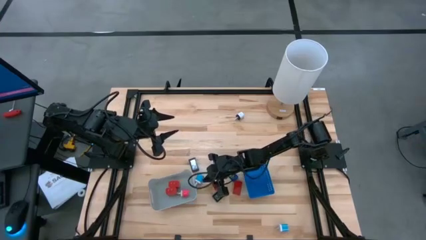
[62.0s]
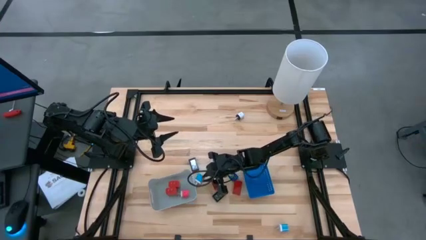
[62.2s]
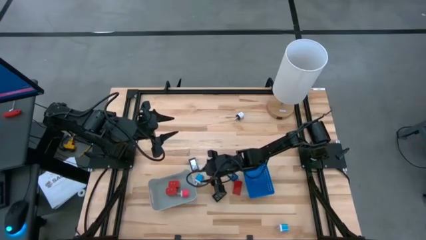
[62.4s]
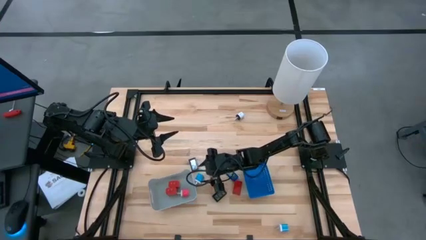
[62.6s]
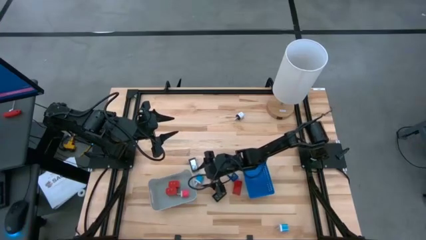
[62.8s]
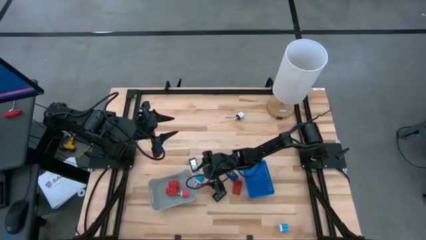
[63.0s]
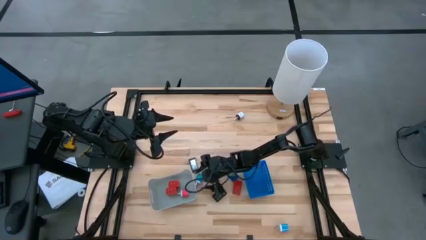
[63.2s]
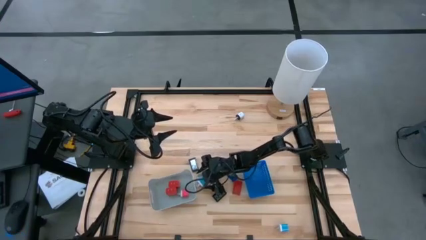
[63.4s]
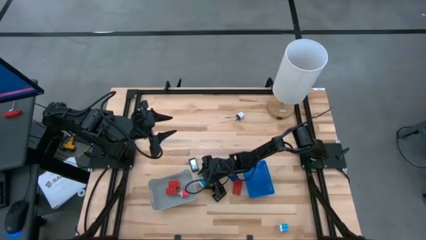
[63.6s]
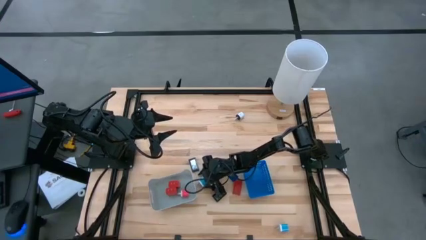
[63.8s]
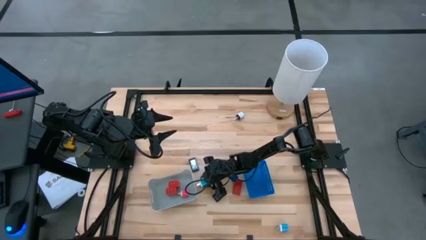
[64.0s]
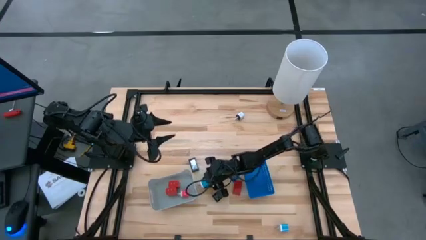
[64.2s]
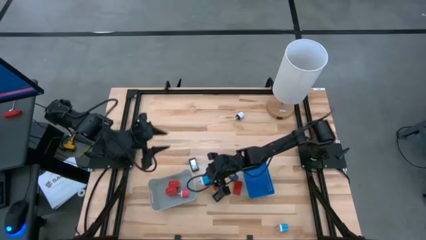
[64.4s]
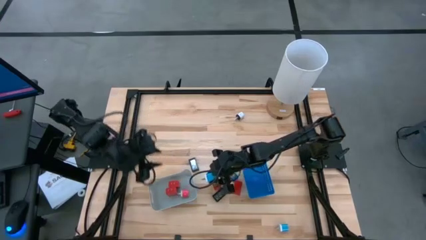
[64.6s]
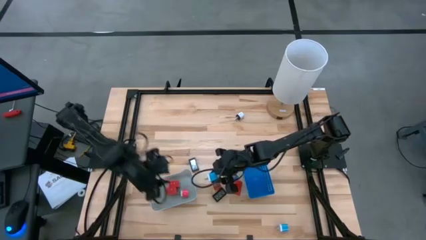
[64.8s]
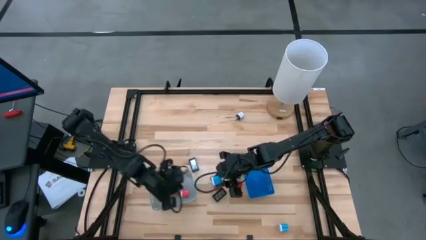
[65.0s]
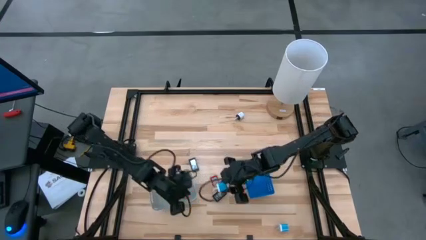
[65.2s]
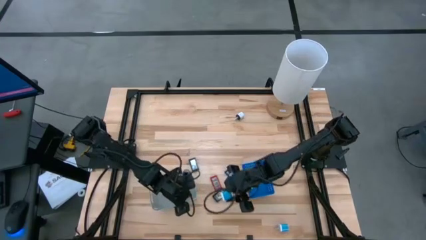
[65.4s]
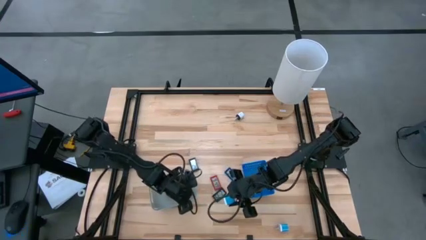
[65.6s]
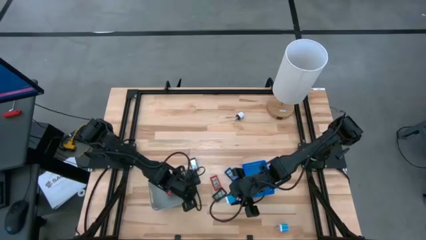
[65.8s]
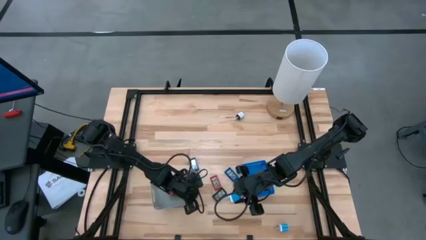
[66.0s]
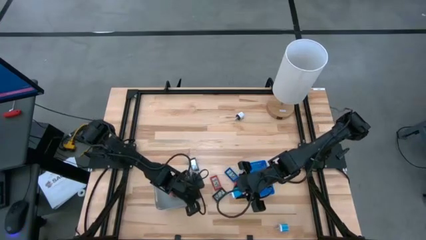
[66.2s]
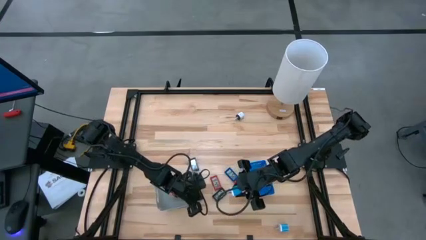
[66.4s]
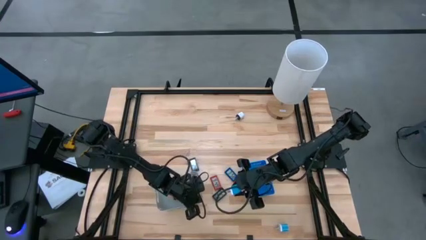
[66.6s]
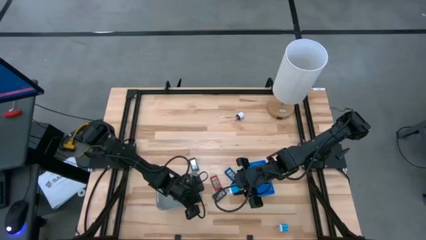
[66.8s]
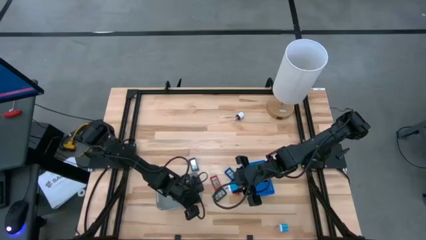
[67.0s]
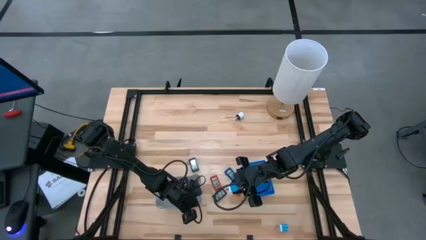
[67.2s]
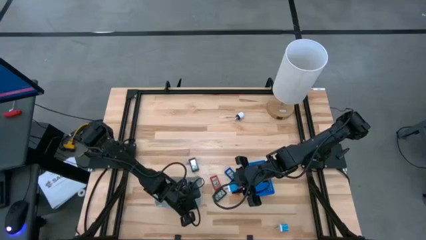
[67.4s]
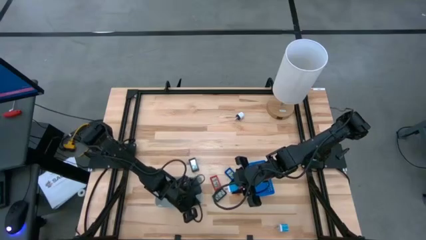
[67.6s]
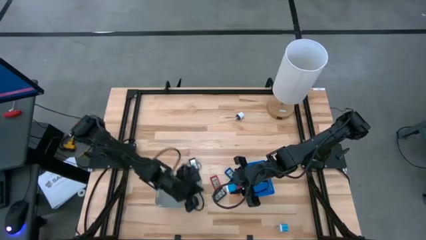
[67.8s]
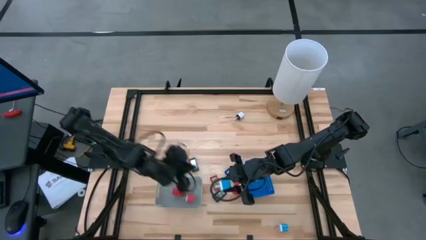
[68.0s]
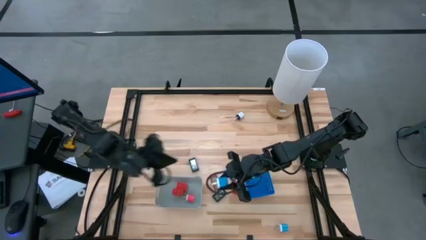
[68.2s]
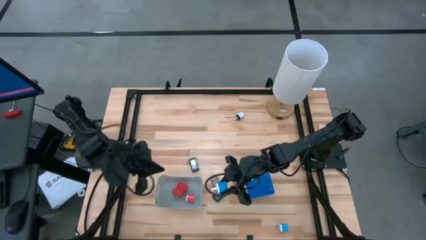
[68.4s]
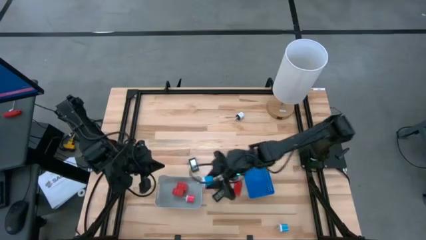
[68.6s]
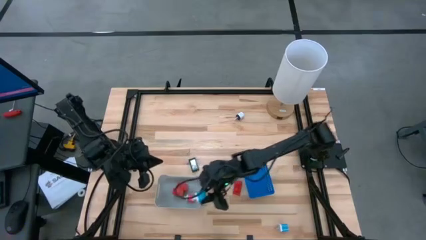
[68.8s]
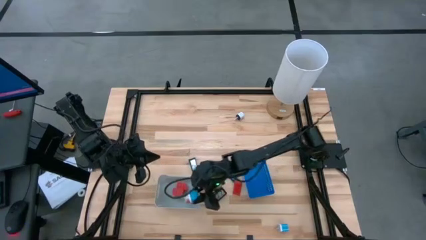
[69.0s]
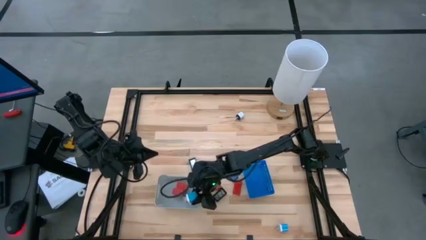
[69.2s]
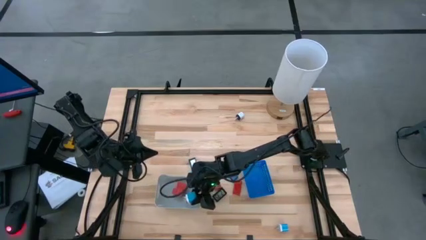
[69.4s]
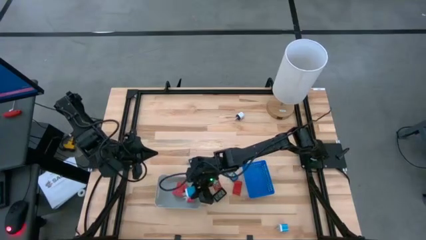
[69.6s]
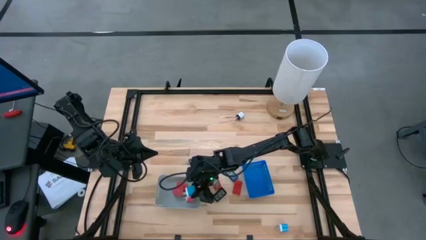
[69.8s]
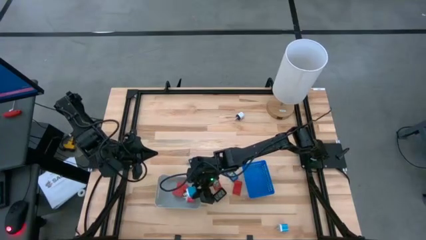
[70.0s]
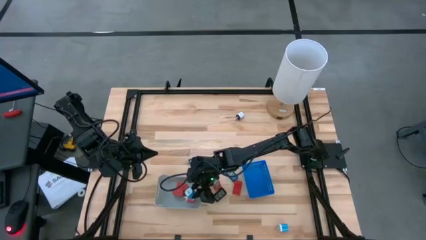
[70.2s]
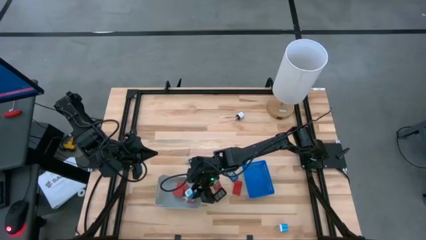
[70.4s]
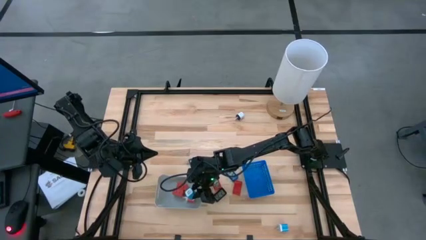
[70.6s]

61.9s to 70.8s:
Task: Pick & Place Office items
Put the top blue charger adapter into the gray bin

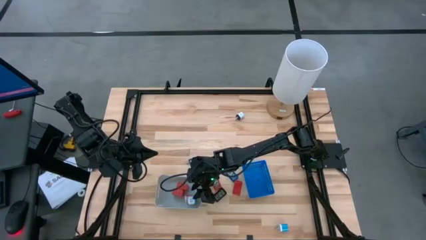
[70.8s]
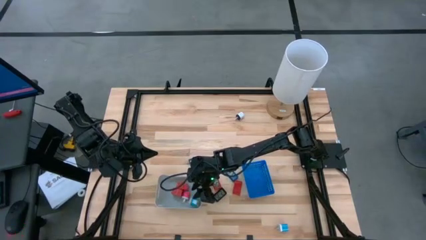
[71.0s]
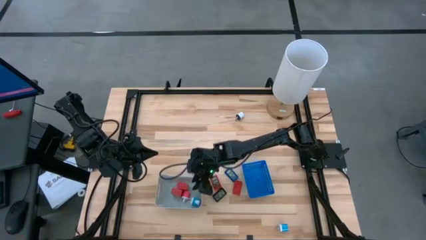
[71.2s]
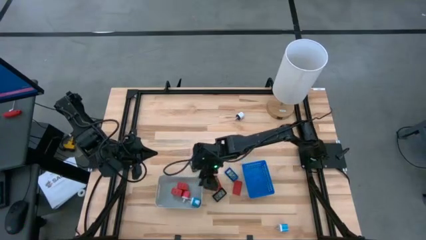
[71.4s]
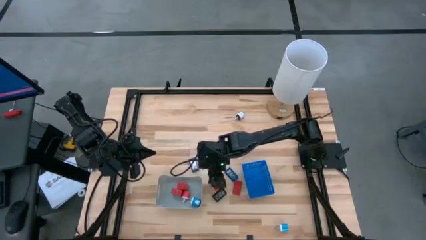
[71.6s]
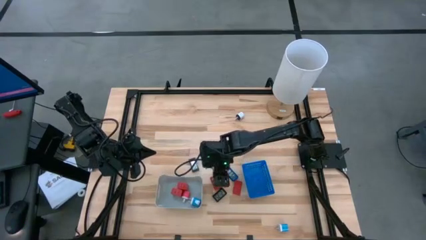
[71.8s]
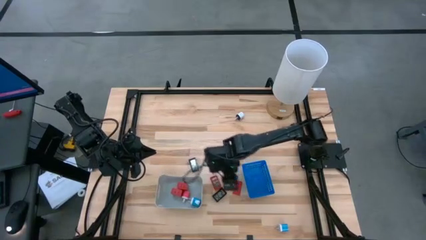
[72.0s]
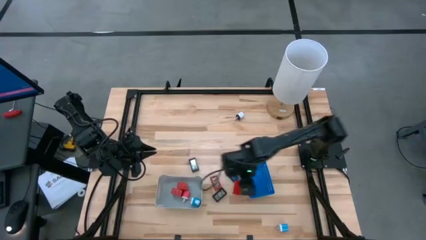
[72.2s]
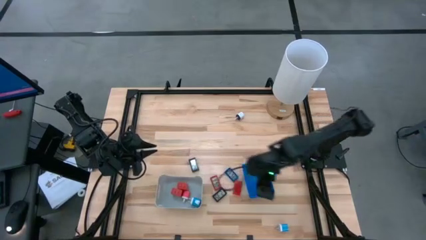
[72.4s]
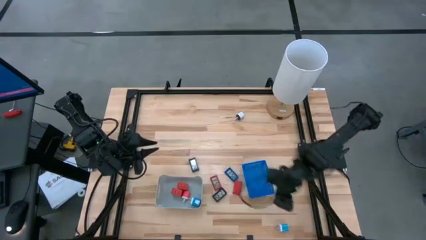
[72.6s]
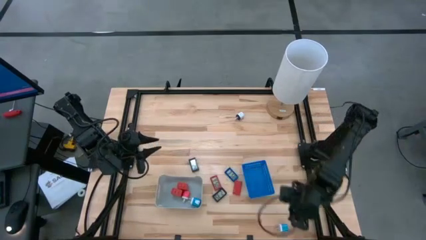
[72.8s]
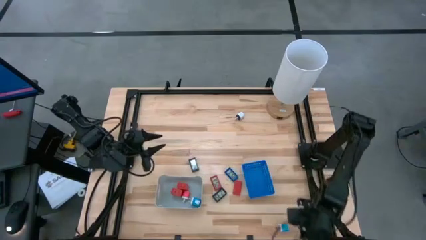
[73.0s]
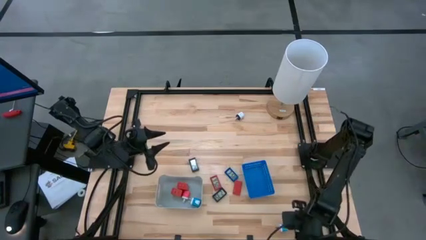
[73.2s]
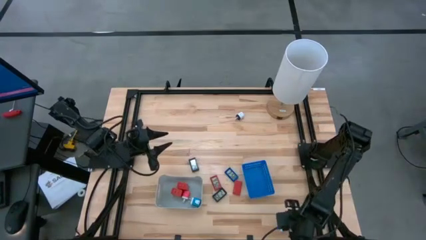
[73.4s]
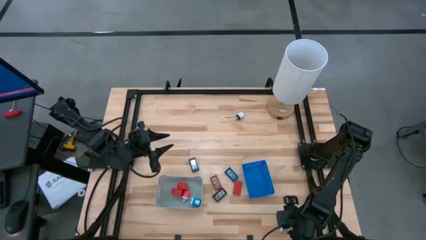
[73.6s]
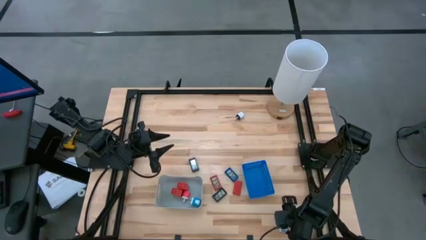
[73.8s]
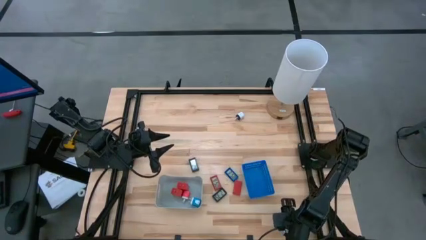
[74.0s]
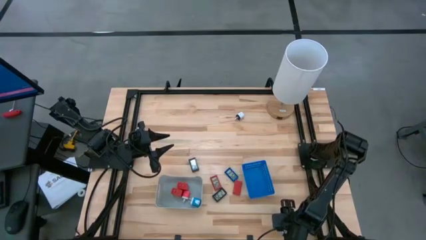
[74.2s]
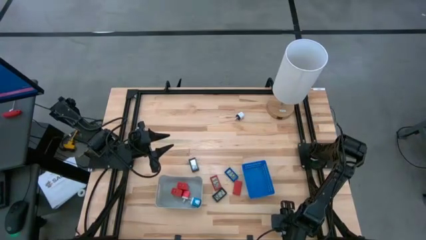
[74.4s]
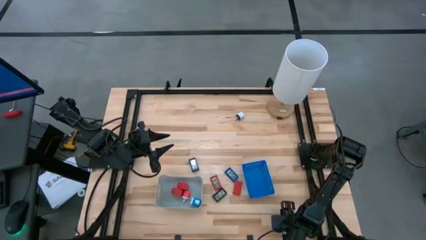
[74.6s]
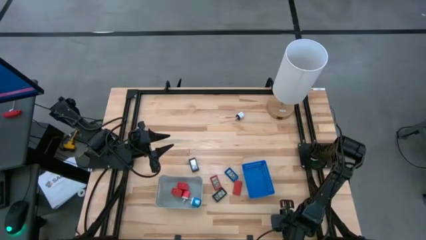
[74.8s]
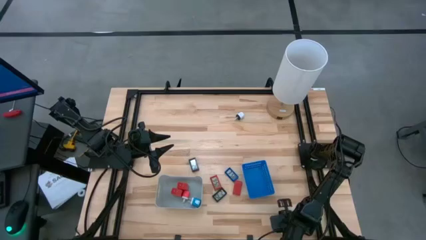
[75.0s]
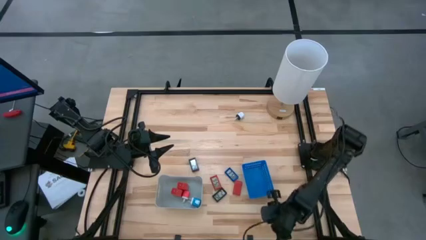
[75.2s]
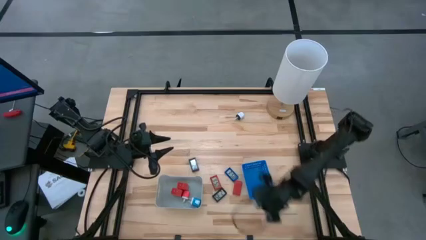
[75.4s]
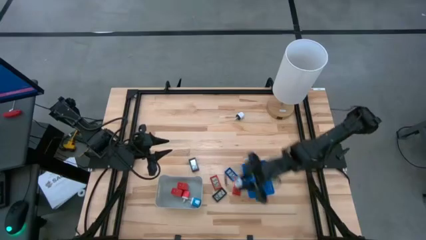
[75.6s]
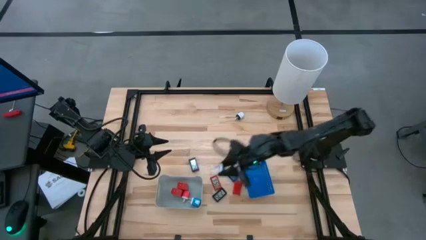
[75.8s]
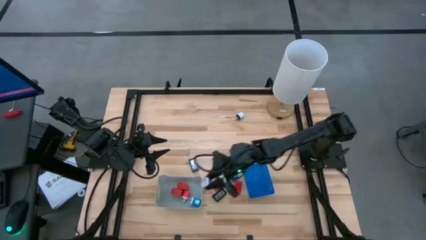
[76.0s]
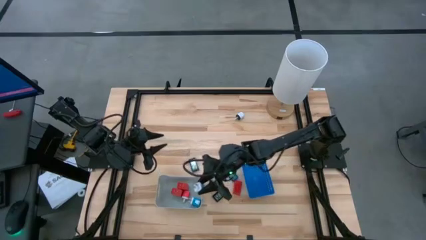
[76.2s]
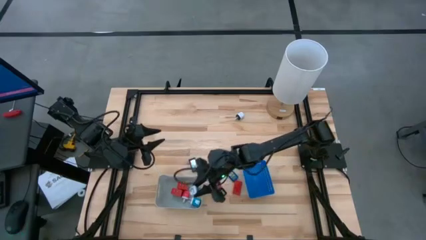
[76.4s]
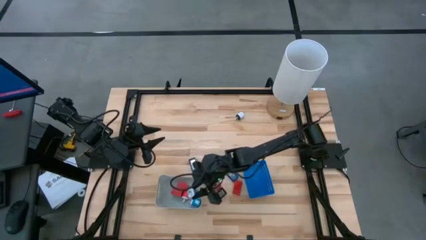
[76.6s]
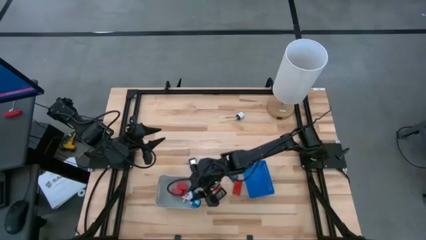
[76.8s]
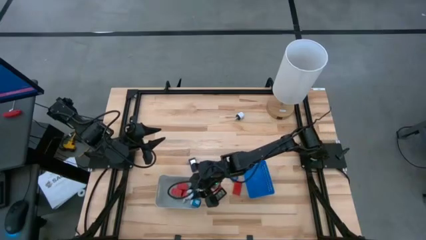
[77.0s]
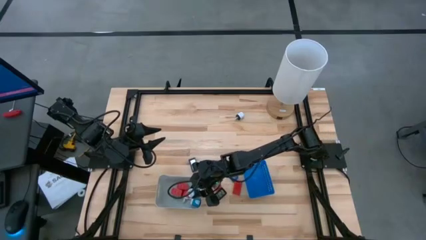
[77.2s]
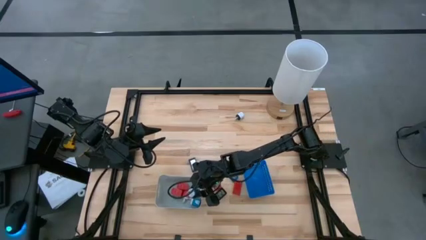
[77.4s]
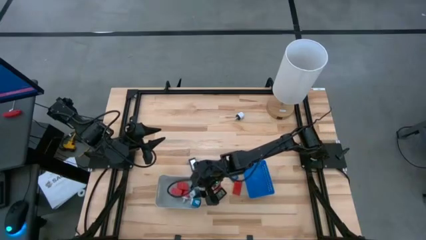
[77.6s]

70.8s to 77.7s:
Put the blue charger adapter into the gray bin
